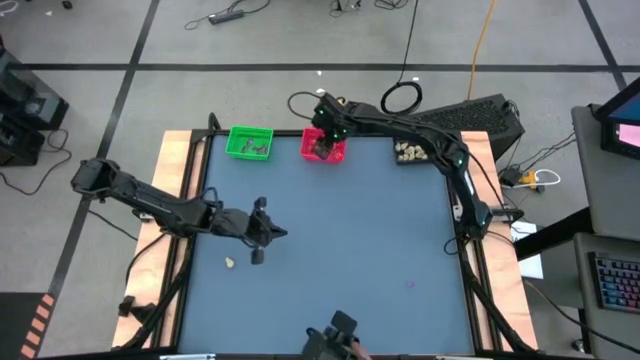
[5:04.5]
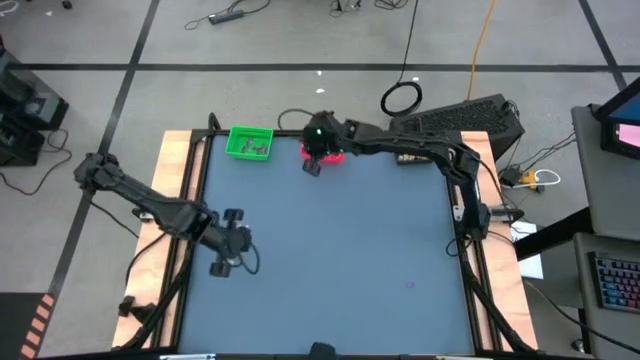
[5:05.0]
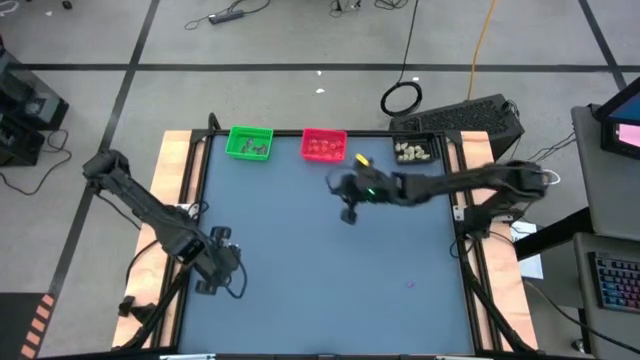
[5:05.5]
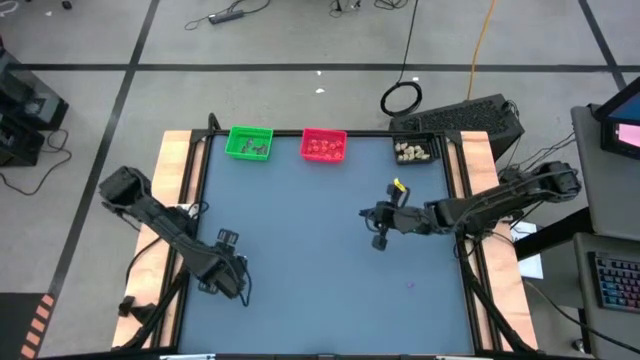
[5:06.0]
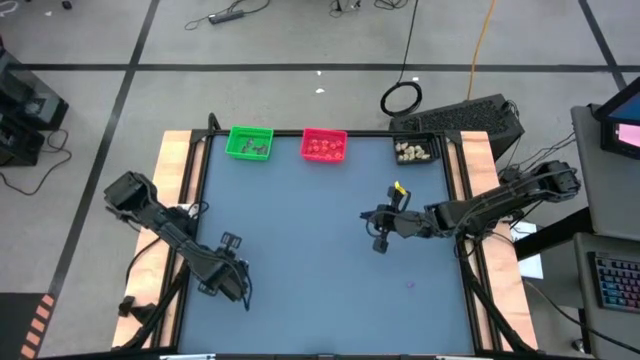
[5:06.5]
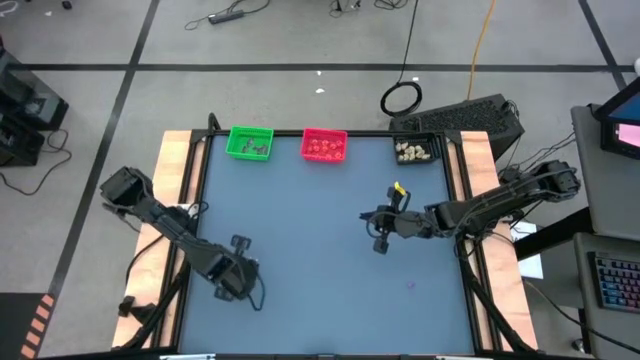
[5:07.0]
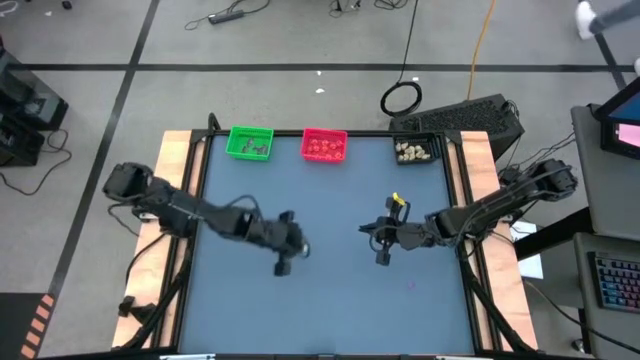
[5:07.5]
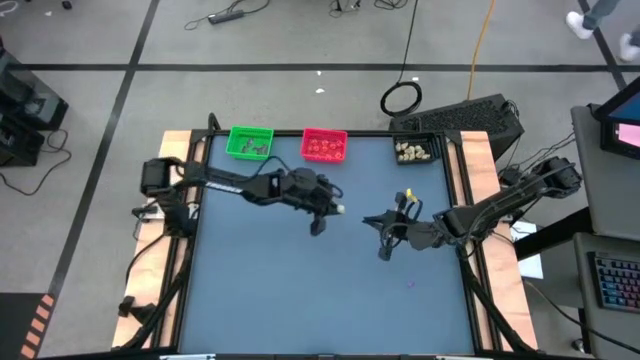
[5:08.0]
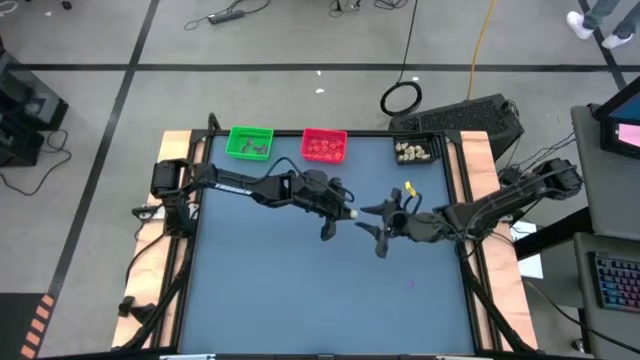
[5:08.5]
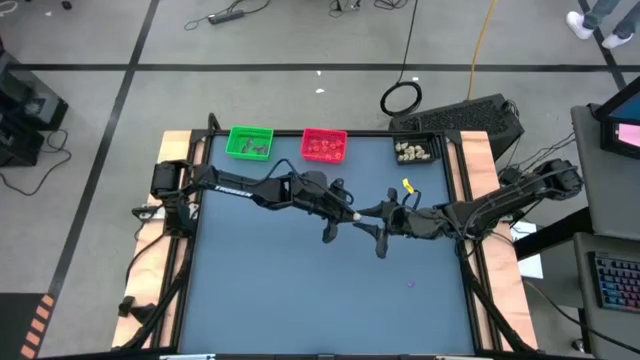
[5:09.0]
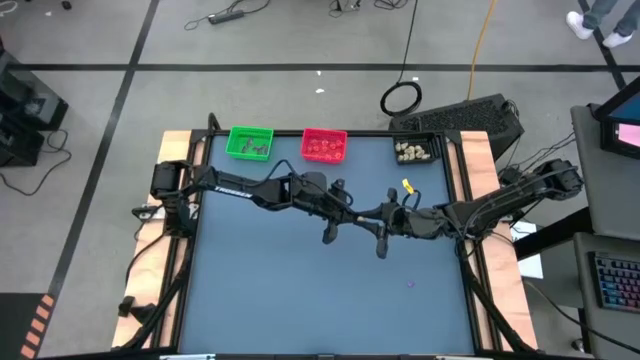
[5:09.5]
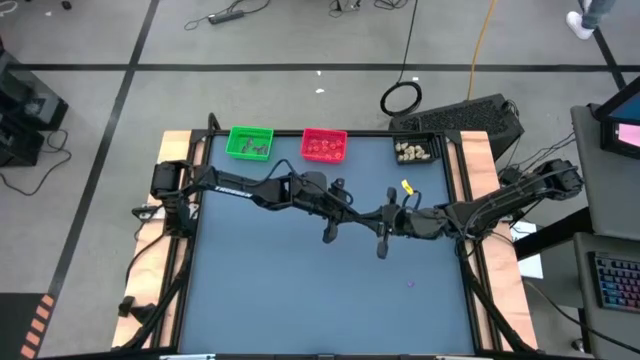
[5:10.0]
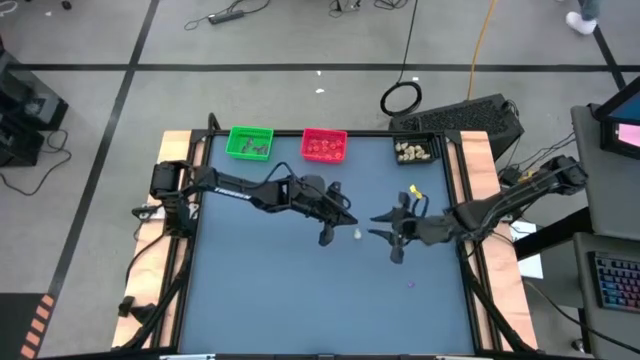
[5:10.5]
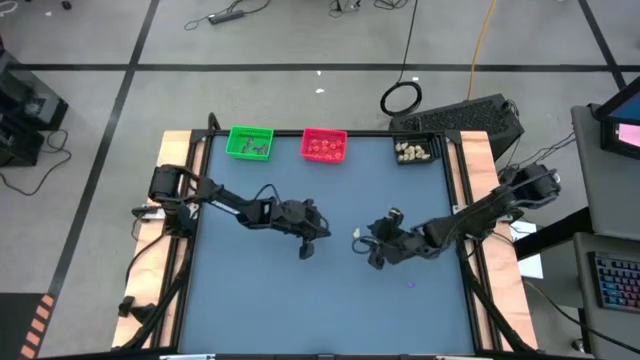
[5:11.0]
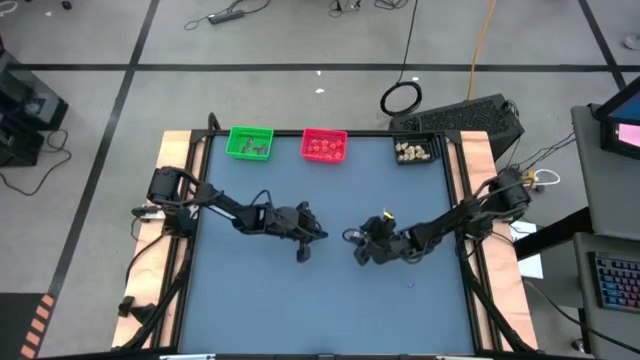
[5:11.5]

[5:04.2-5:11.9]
Task: Sort Halloween decoration
Put the white skull toy into the black bin

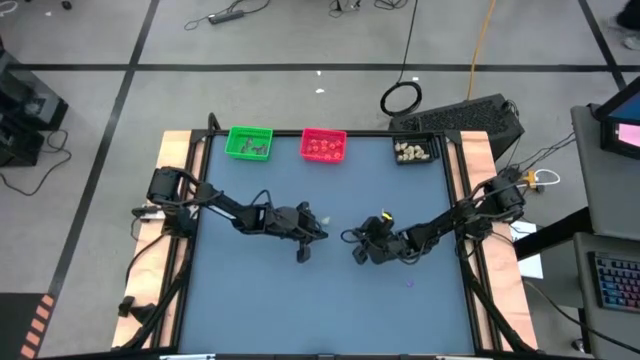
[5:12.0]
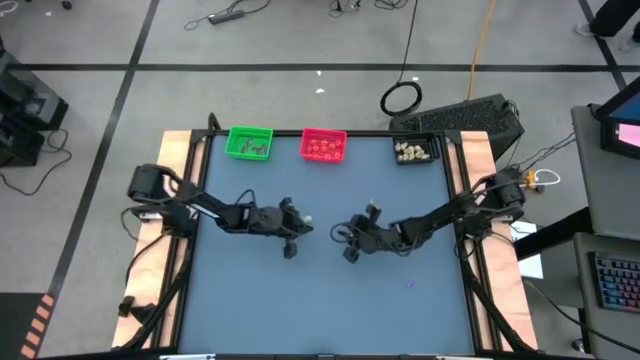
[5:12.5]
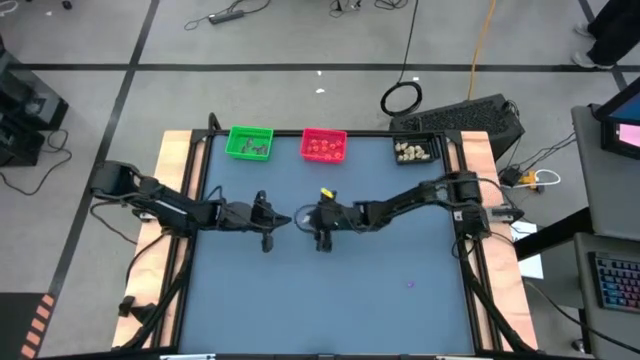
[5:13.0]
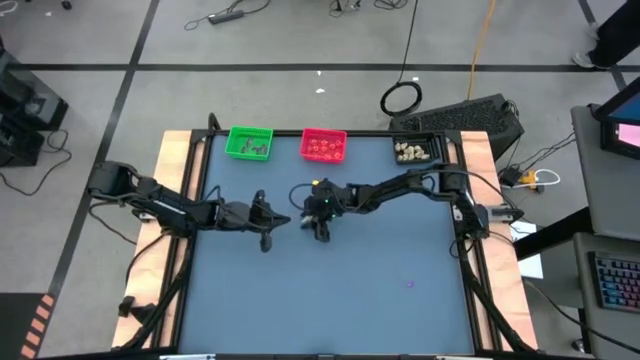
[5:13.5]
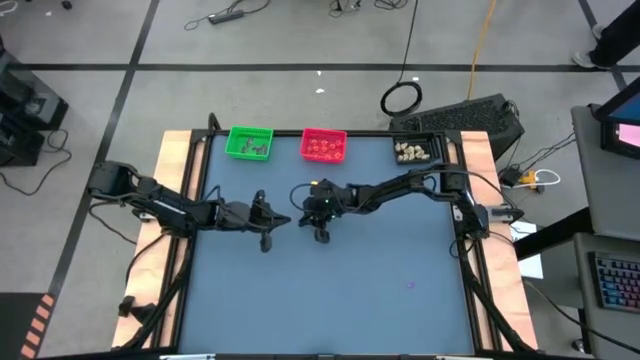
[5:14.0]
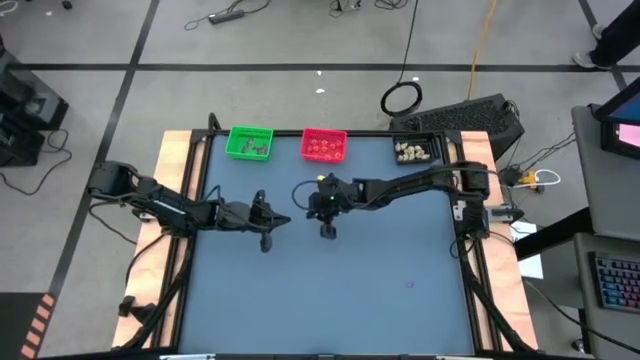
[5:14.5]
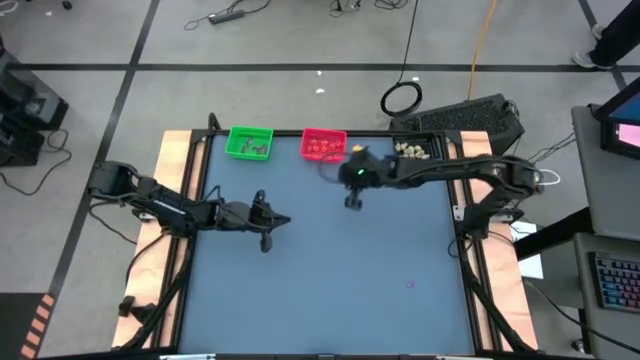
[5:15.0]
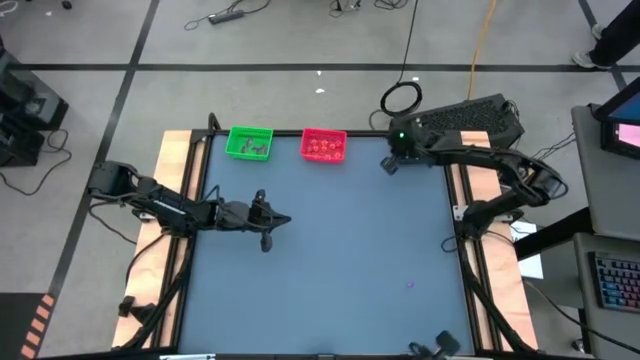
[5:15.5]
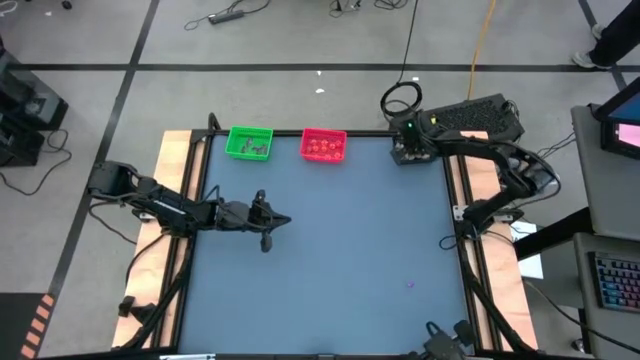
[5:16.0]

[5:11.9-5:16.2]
Put the white skull toy into the black bin

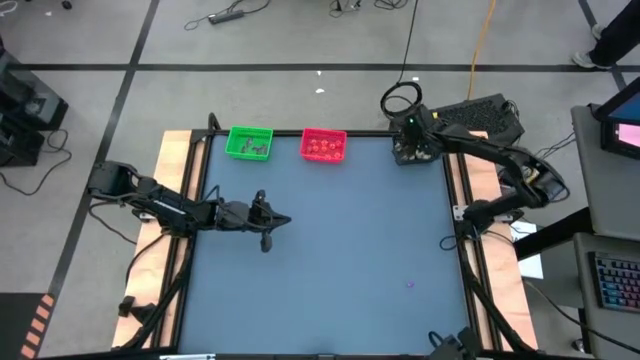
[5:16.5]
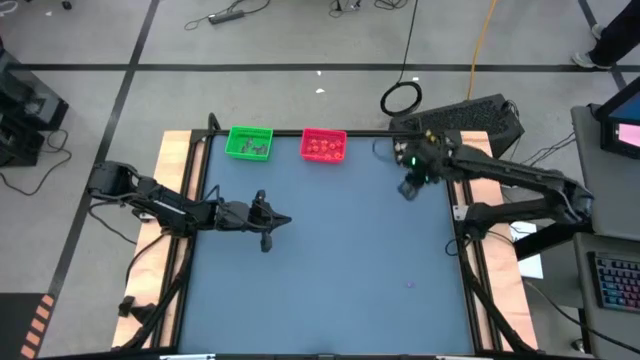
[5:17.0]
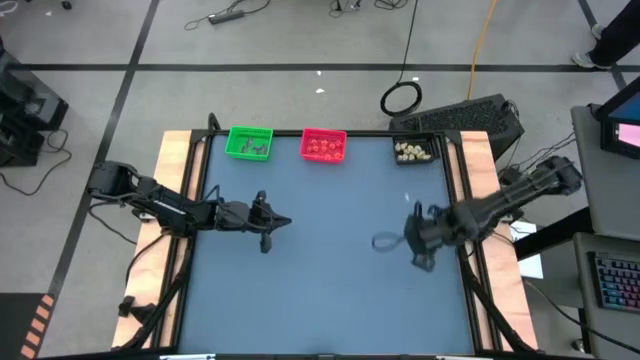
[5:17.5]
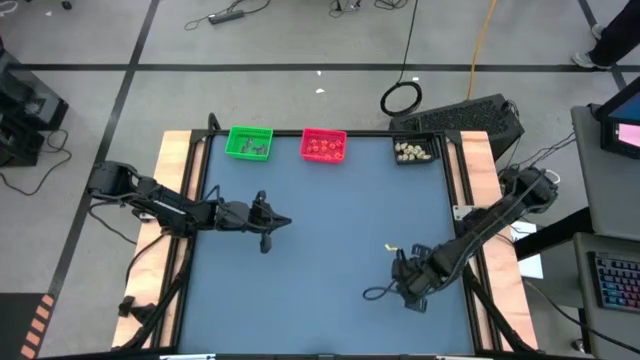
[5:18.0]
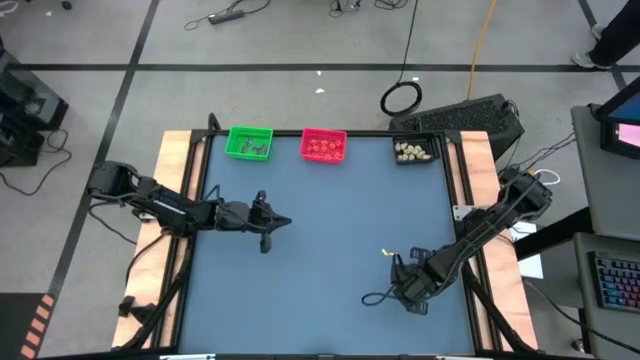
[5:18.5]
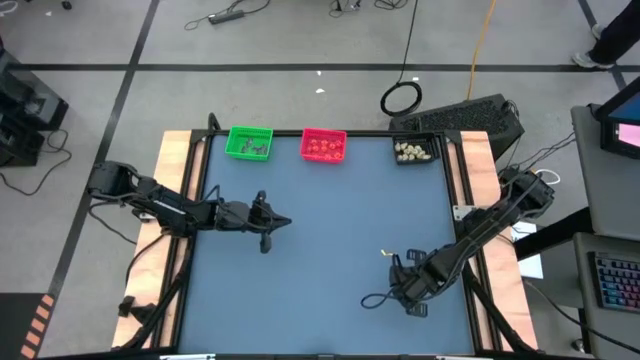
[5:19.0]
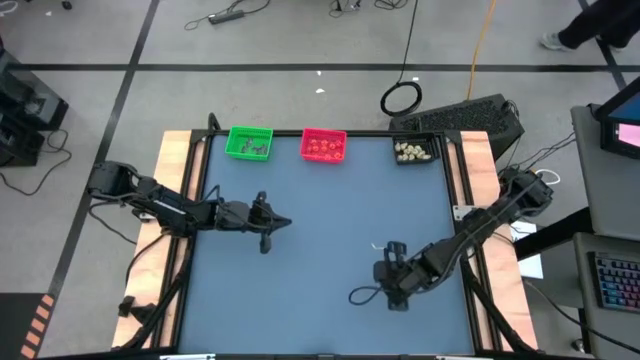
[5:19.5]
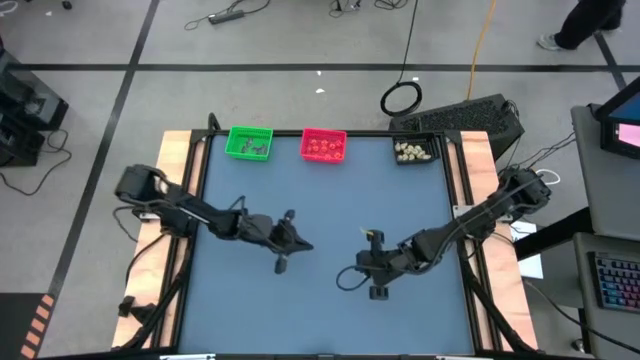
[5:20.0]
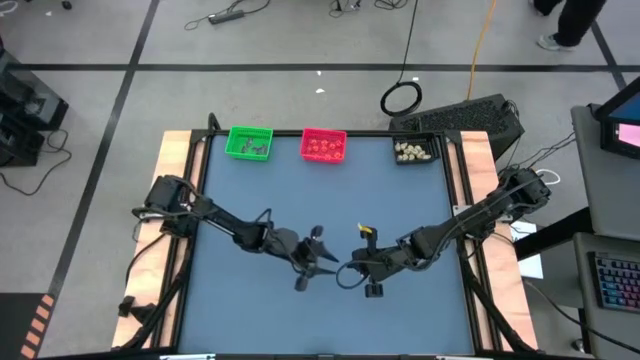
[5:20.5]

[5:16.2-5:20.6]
Put the purple witch hat toy into the green bin

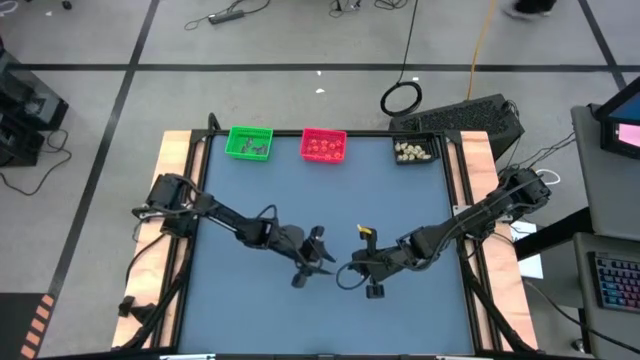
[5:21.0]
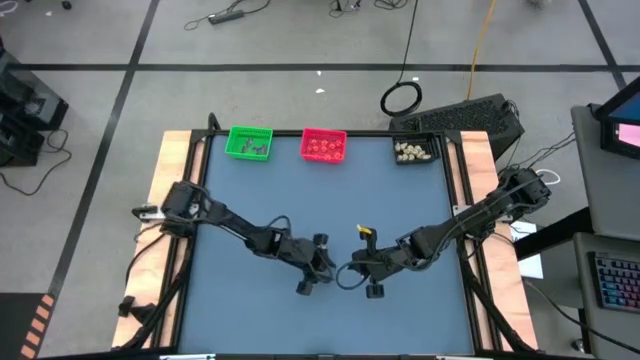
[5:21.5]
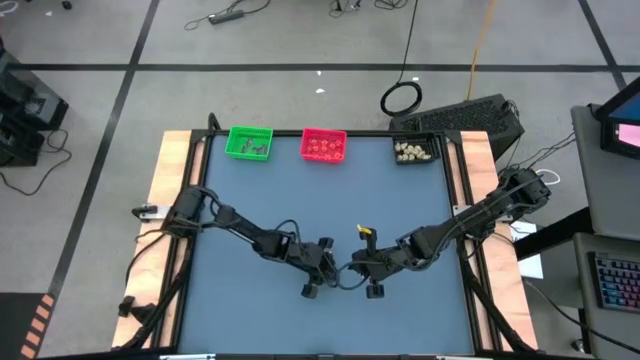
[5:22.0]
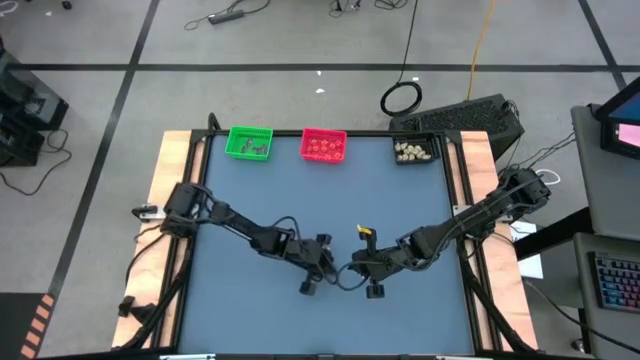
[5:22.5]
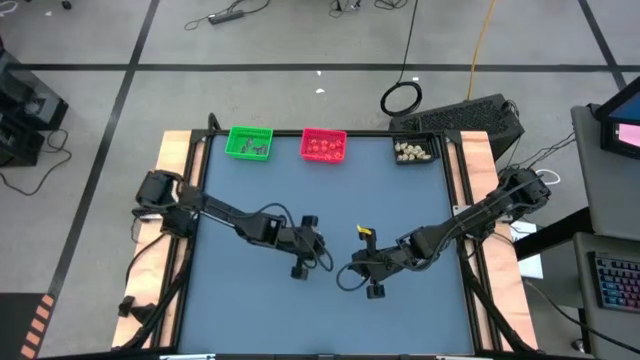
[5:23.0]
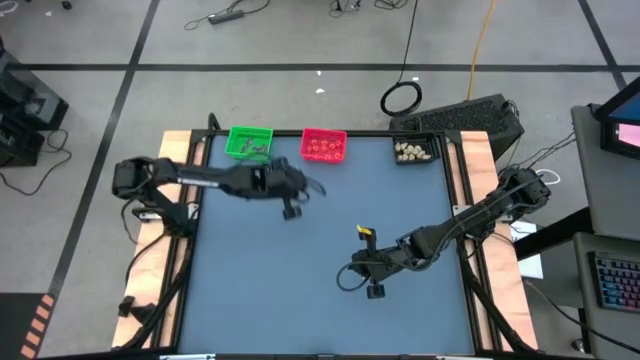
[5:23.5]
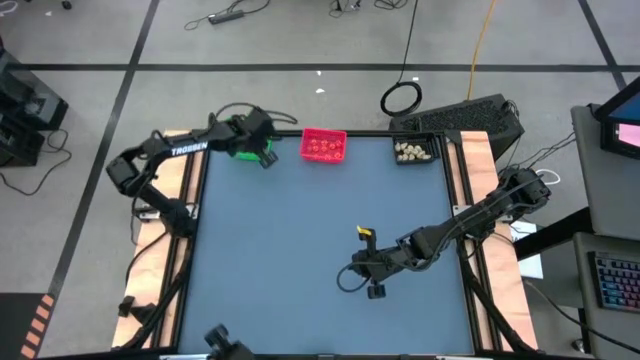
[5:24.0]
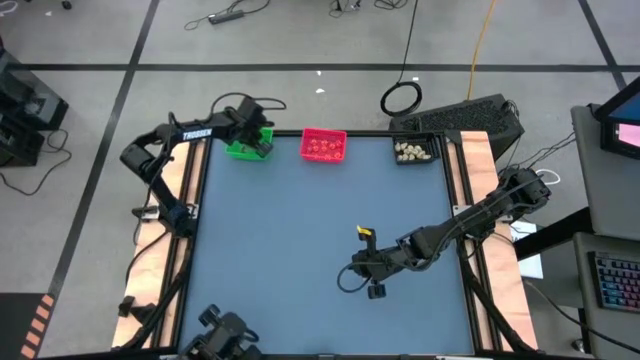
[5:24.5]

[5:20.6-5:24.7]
Put the purple witch hat toy into the green bin
